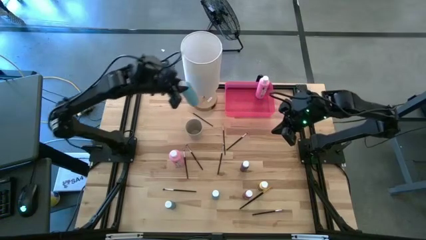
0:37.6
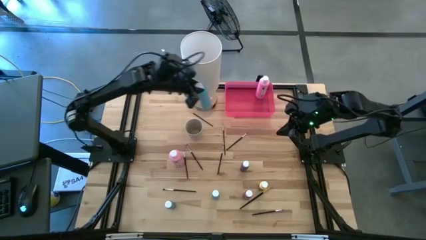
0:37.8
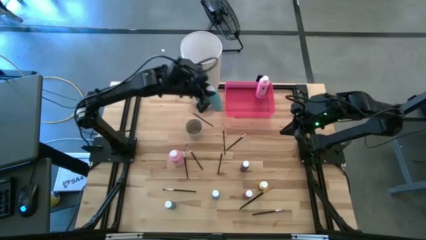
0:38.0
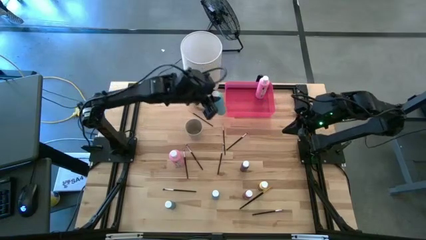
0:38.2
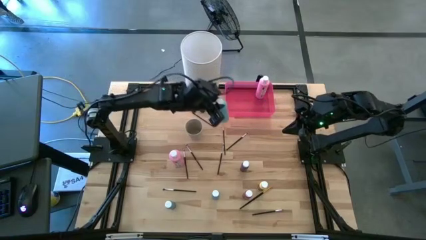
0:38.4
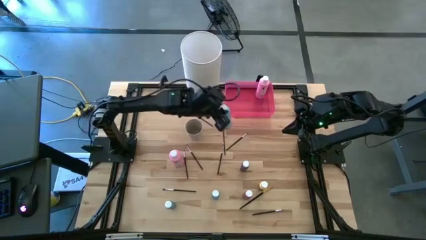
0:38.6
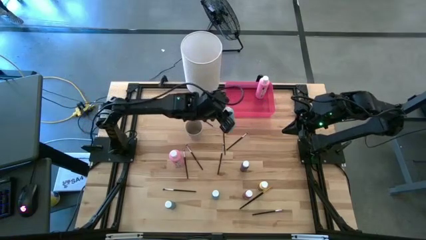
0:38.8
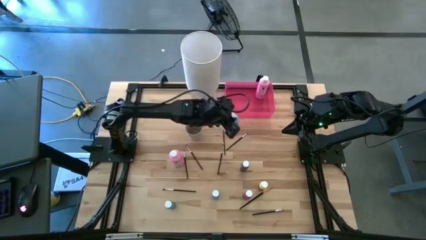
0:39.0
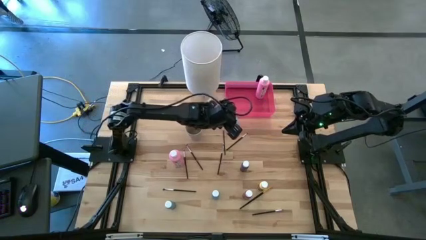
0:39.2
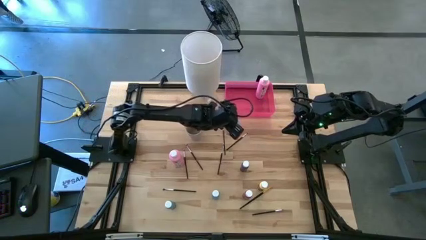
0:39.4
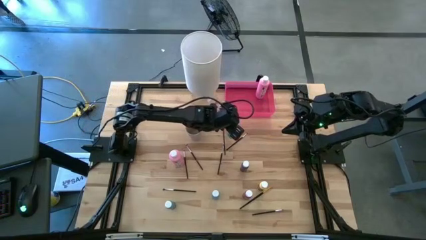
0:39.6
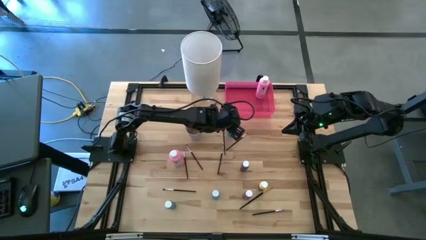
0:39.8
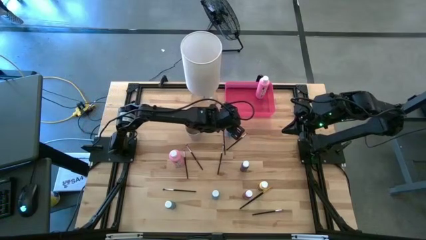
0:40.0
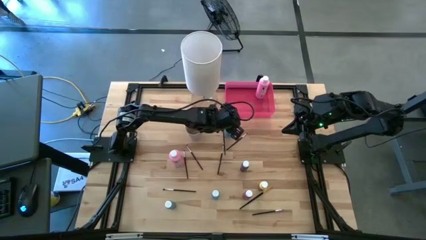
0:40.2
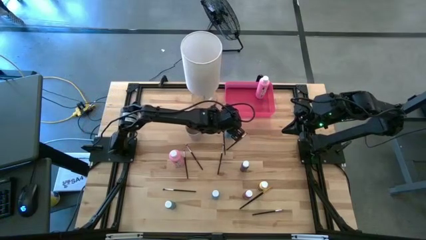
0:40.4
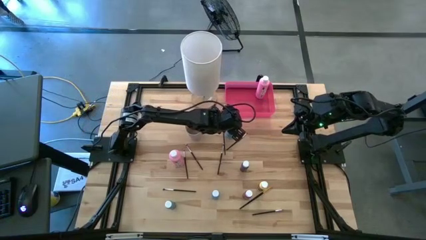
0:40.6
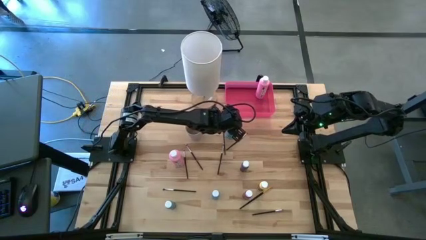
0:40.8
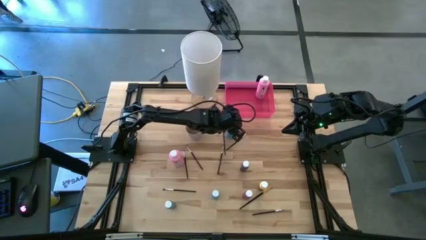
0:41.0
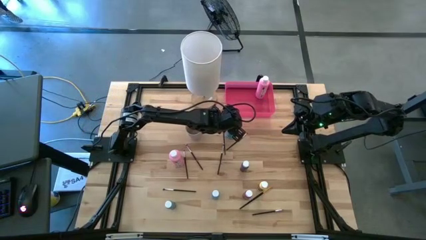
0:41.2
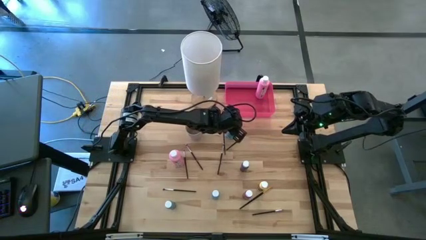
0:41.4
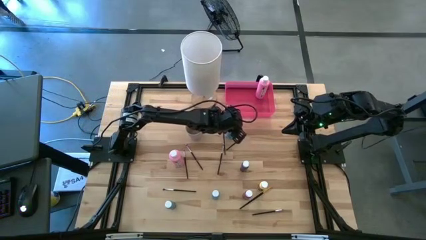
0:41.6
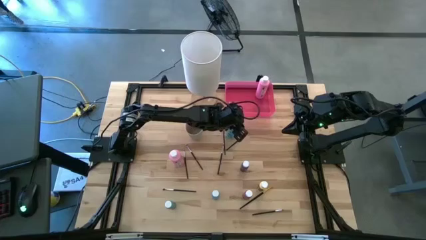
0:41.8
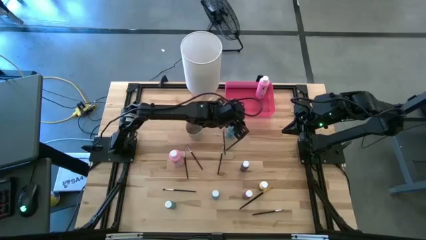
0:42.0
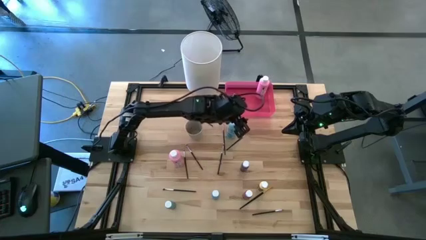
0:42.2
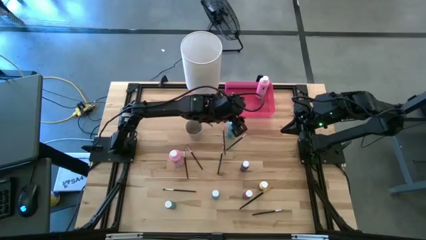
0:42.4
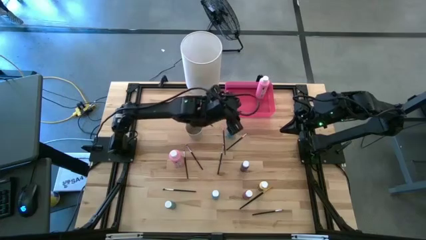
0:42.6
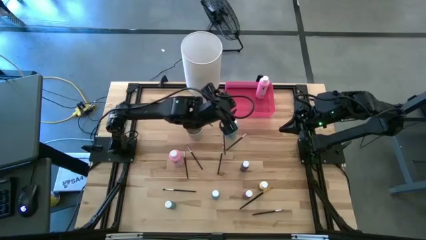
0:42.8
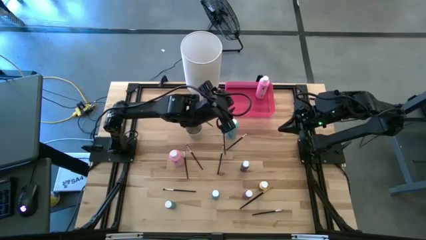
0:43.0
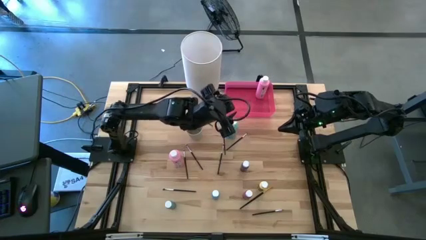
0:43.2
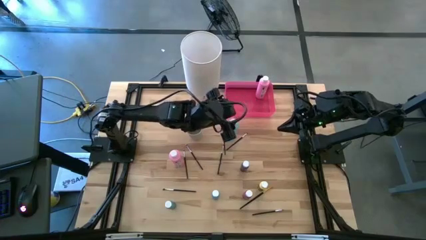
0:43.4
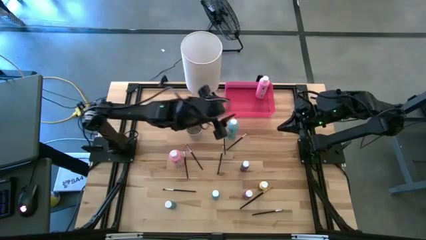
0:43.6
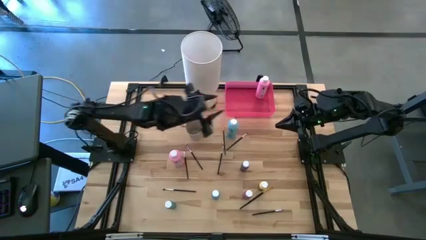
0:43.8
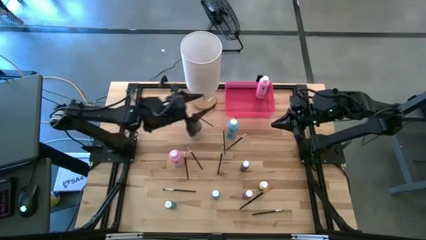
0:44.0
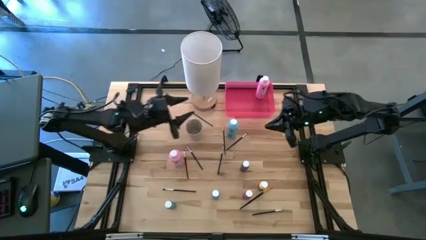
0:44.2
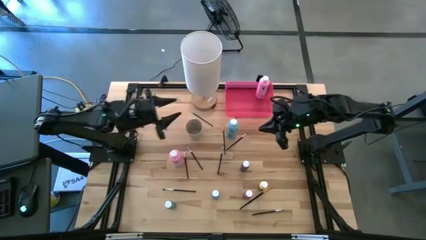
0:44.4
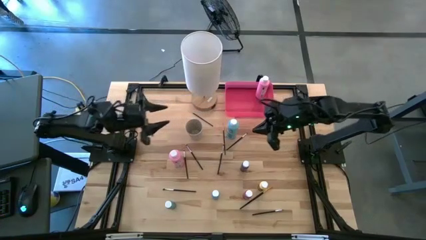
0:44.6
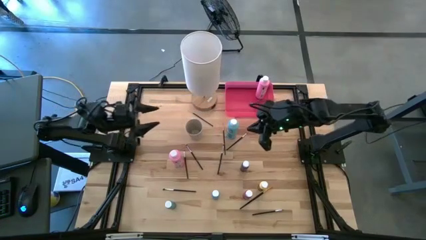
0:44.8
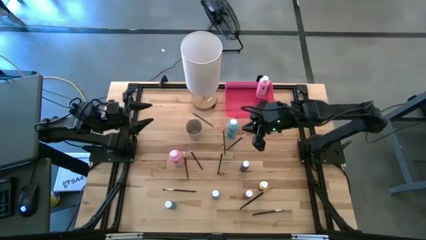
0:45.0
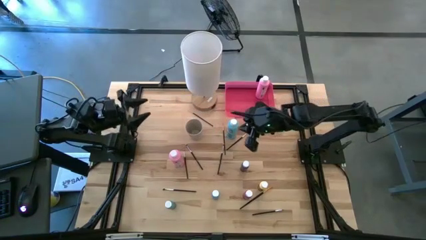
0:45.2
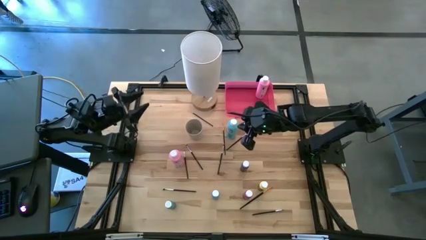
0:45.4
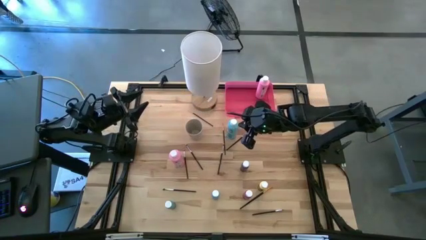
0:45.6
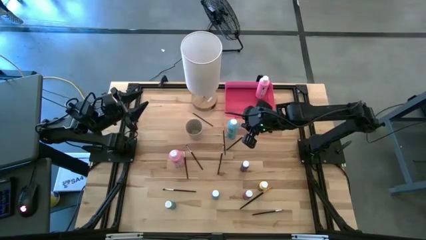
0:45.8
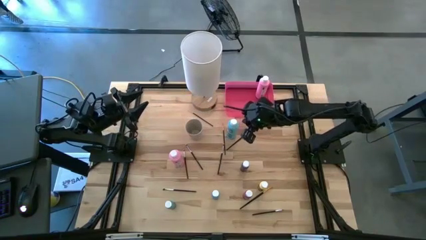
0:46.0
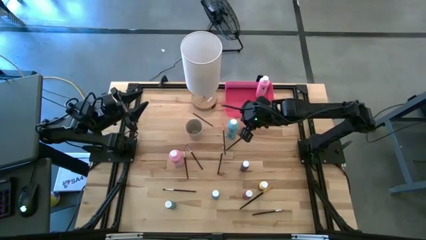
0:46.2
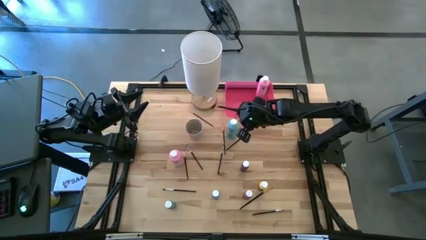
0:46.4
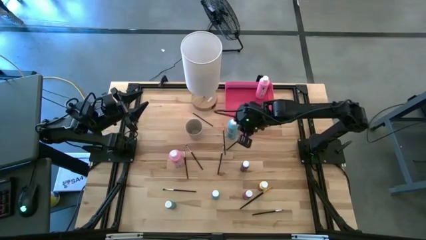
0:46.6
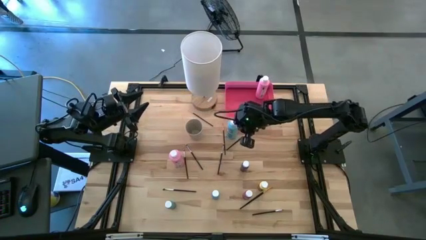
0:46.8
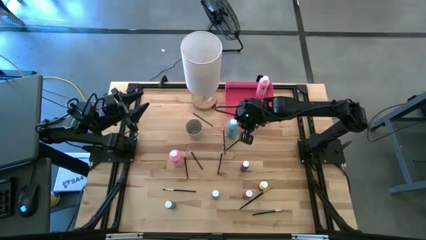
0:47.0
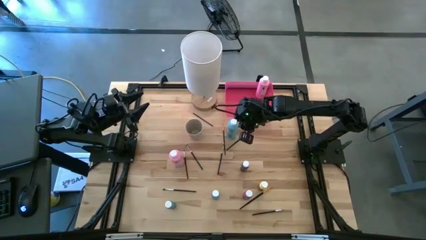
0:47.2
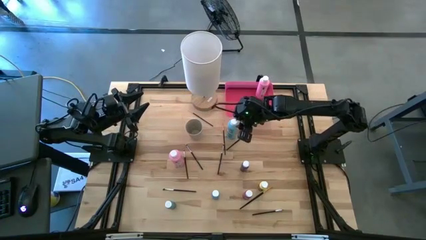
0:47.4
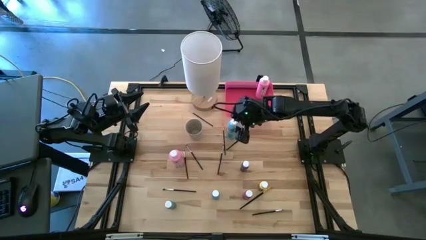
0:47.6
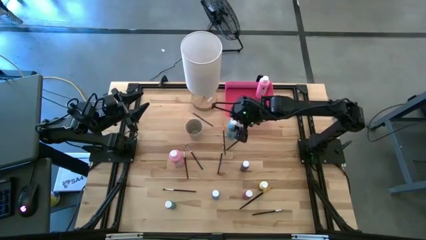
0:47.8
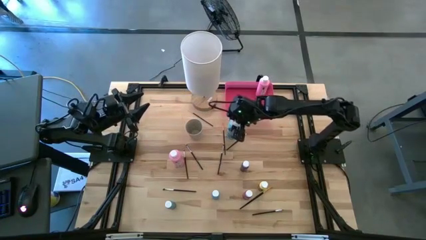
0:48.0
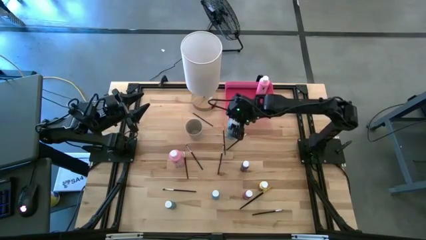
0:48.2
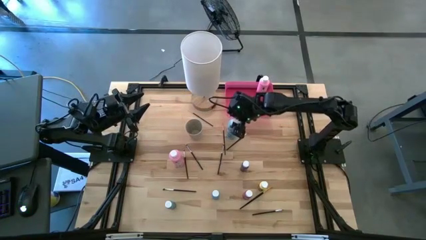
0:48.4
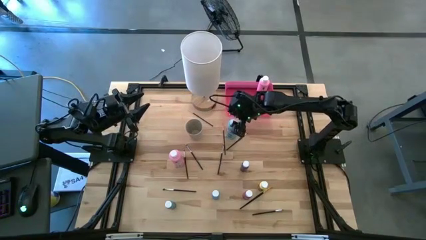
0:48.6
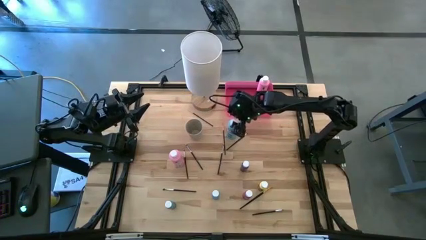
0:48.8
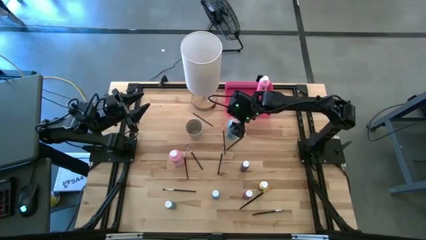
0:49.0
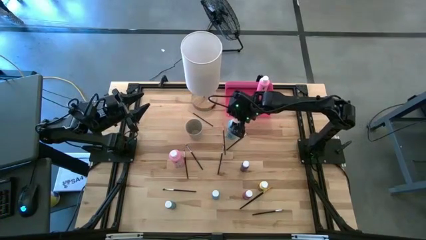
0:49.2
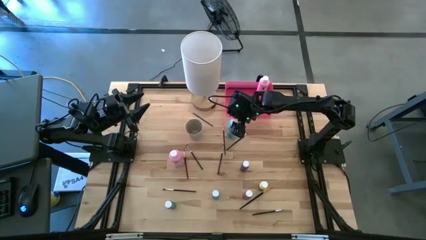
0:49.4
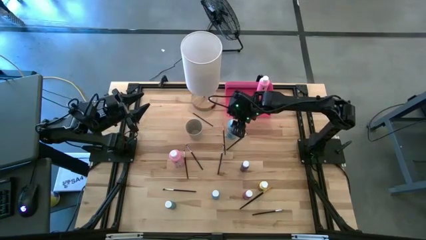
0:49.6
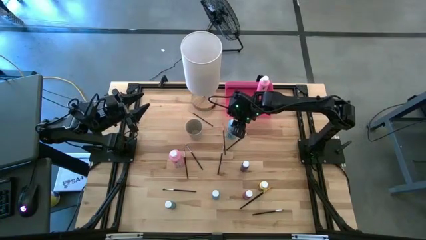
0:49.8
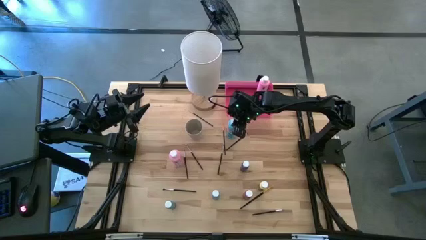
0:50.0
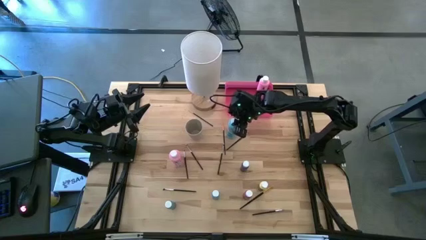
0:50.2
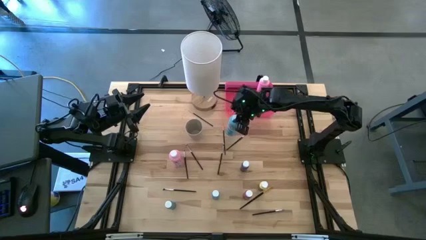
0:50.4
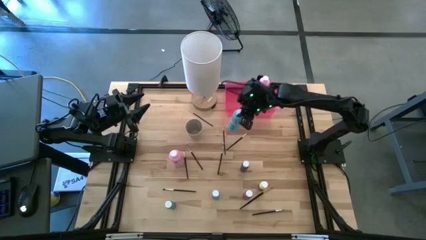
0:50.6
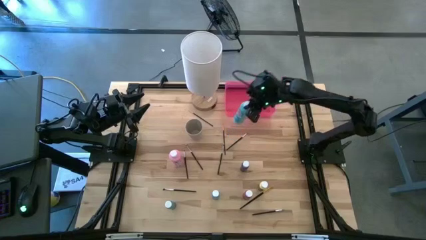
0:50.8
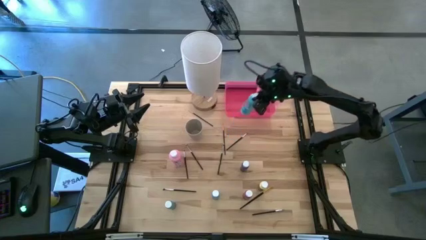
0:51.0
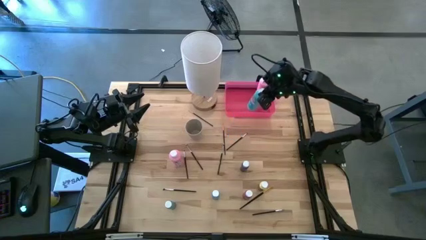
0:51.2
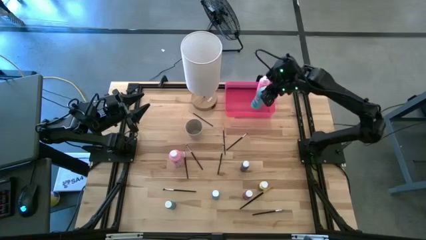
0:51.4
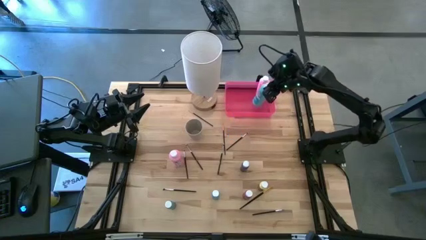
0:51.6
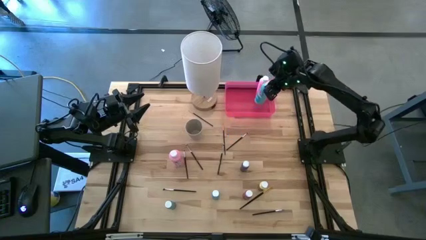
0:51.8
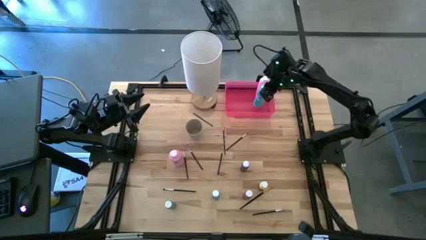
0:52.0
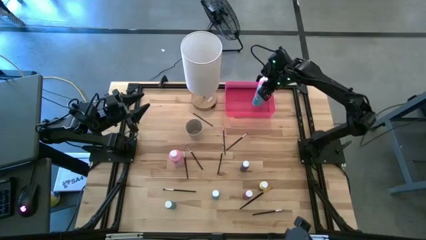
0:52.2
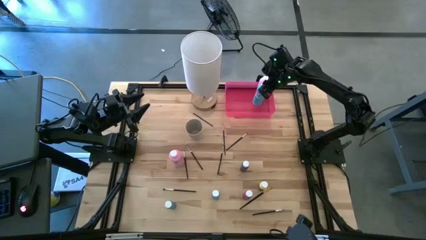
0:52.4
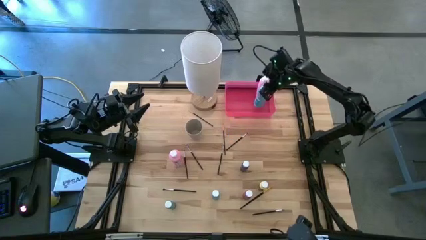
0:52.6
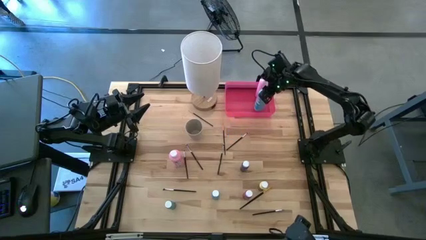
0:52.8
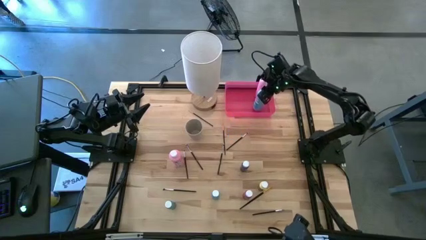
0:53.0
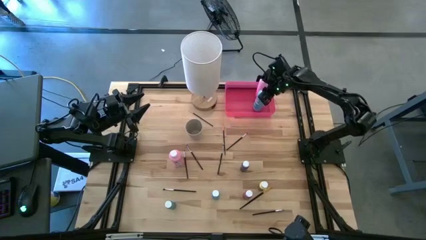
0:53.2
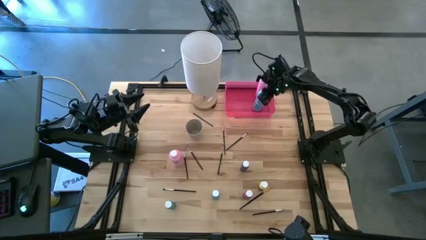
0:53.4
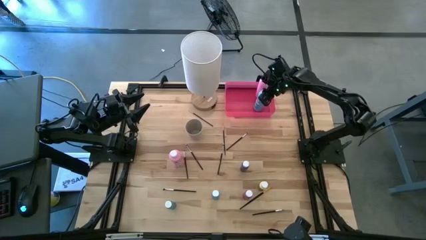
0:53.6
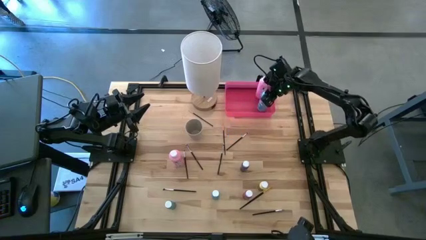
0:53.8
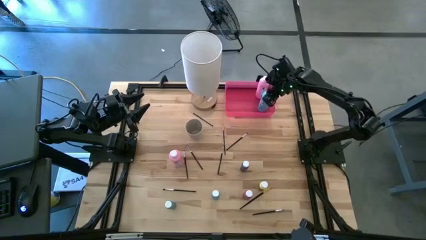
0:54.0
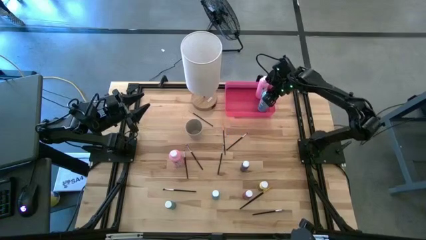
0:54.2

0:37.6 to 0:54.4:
Task: Pick & Place Paint Supplies
Put the big blue paint bottle into the pink bin
